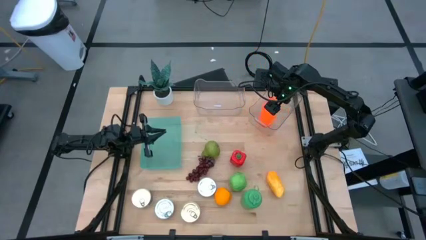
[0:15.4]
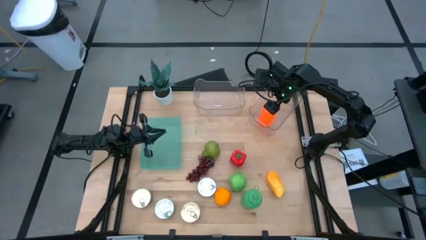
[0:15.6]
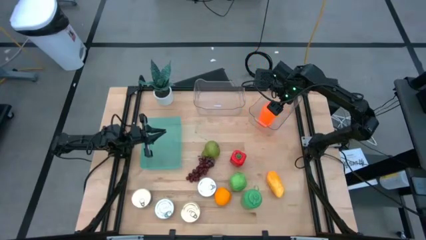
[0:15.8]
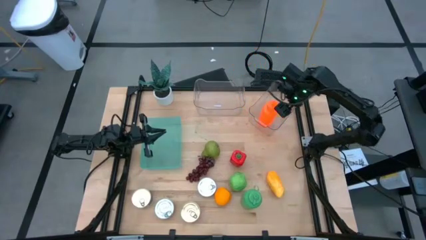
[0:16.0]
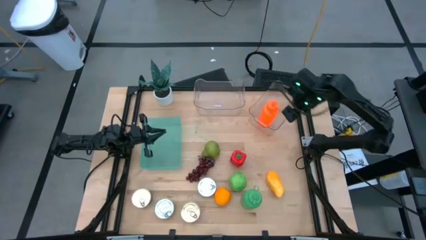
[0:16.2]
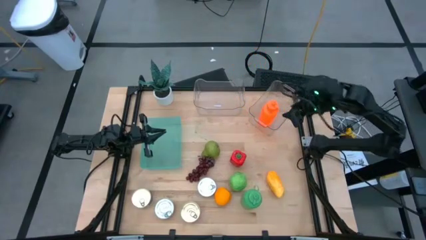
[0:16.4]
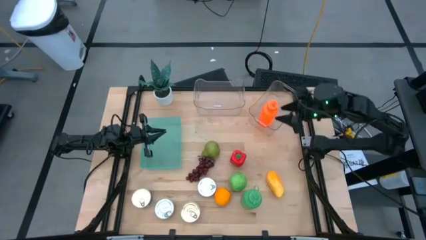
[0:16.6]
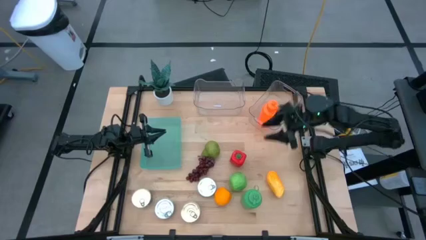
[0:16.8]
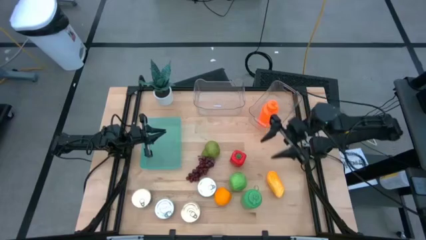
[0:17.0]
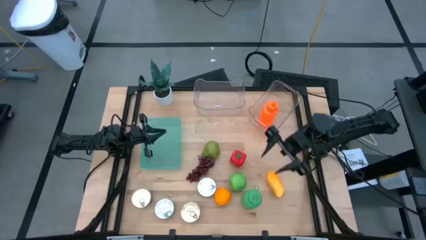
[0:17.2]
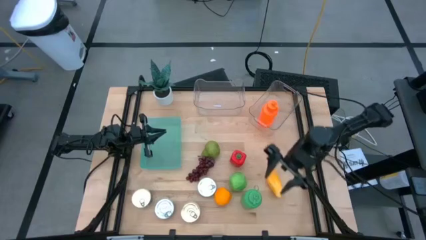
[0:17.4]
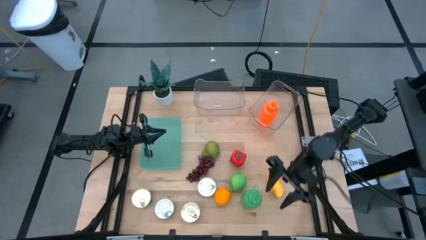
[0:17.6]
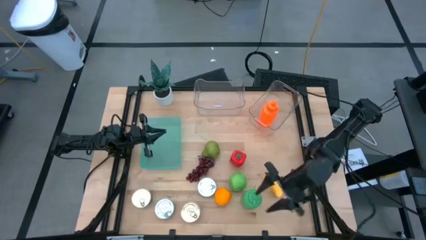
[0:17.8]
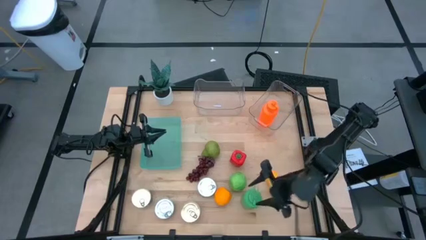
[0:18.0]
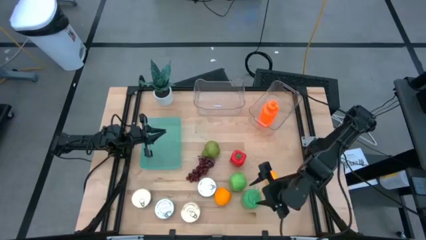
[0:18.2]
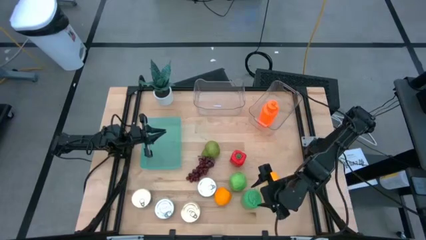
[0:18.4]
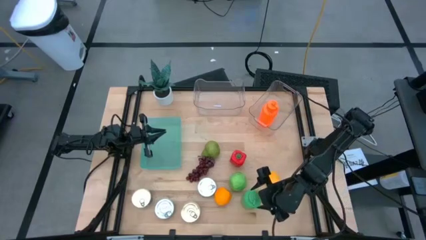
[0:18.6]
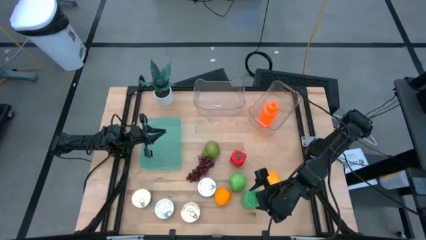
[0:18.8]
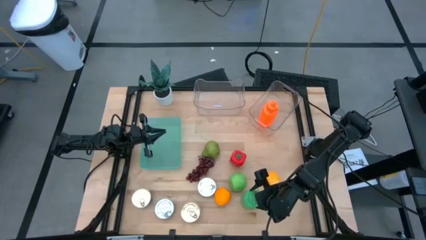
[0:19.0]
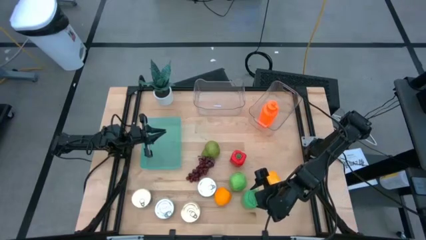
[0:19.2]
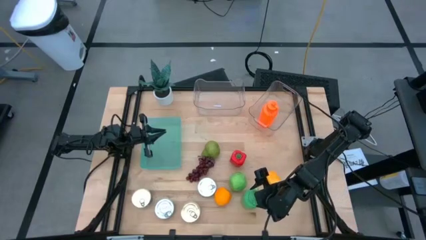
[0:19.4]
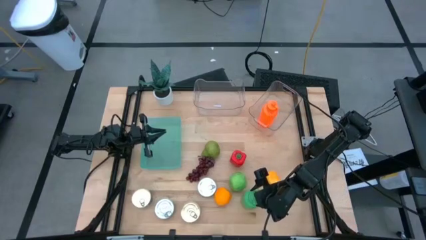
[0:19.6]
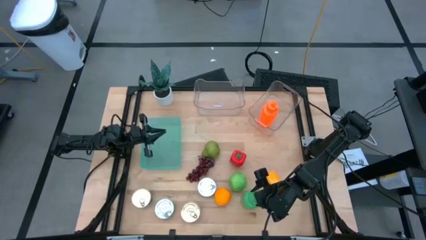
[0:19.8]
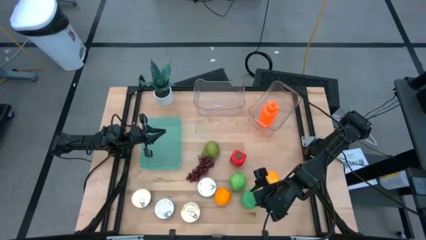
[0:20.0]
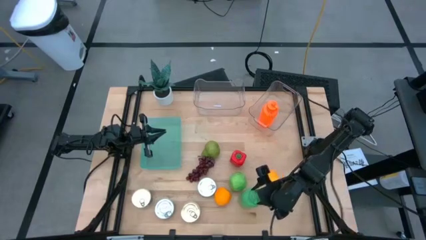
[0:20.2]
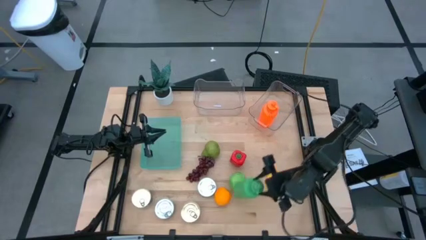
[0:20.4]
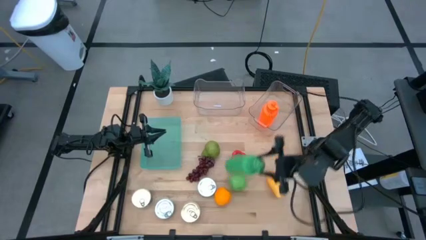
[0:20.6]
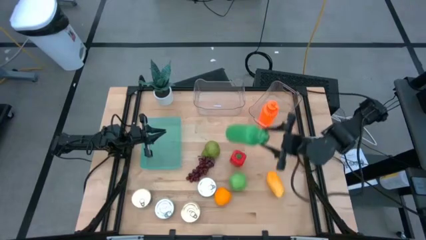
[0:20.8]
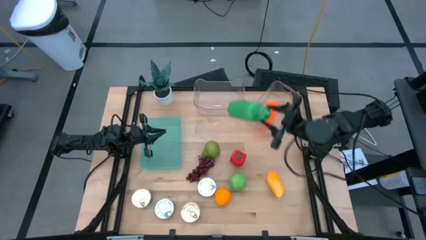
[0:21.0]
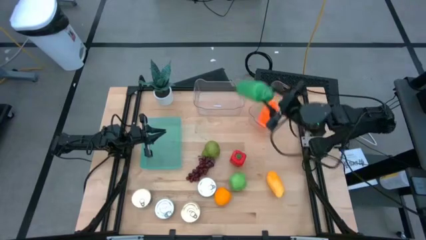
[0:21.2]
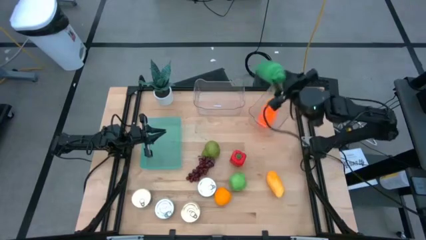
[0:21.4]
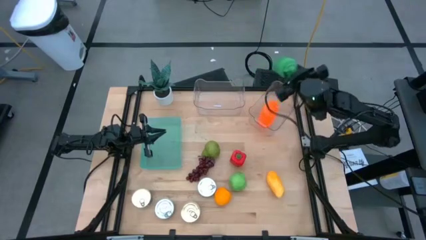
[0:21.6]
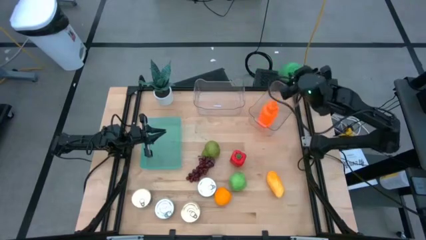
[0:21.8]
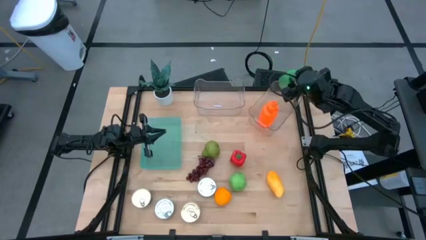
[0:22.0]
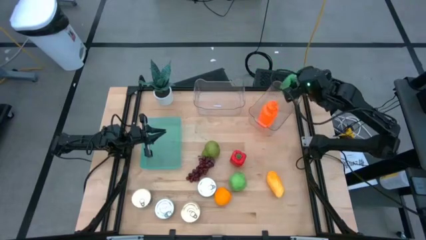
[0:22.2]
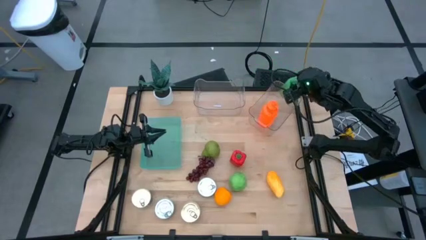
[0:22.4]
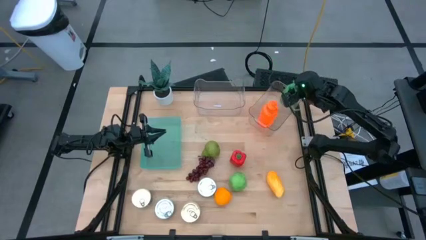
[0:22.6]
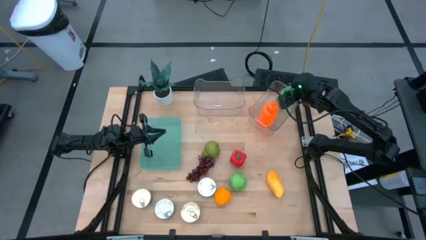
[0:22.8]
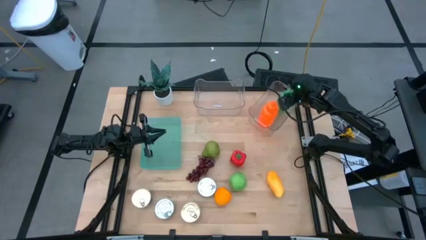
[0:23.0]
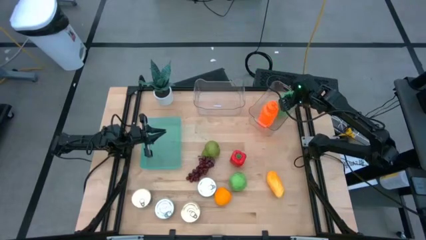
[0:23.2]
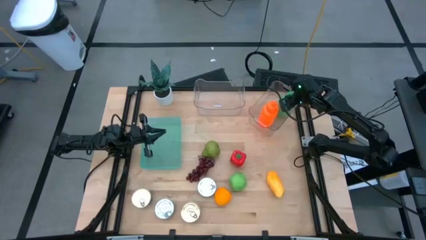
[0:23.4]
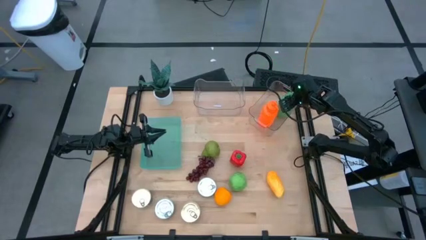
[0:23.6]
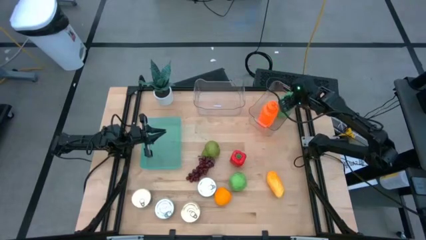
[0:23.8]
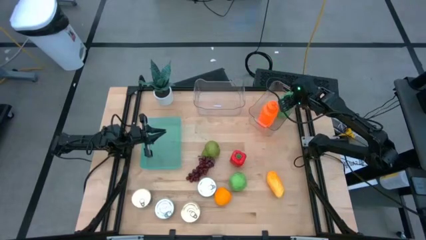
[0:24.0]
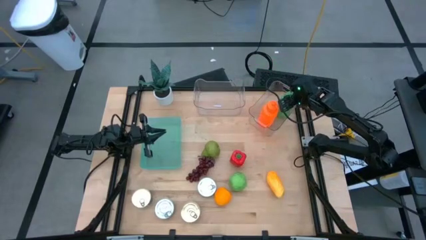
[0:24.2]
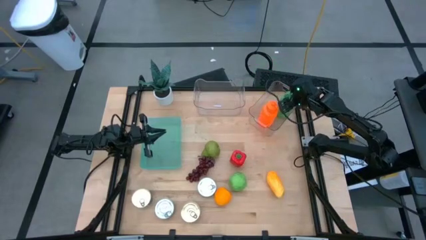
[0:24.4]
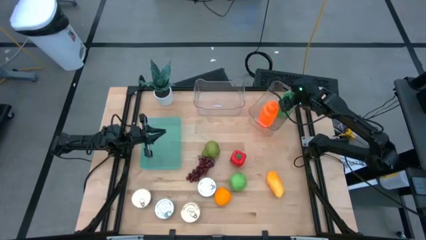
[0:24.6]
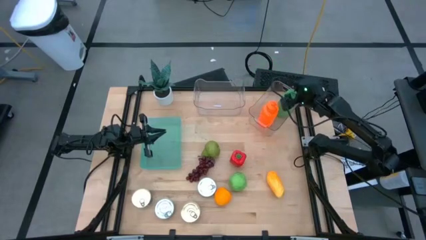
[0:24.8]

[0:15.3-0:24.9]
Task: Pick & Place Food Item
Put the green tumbler into the right transparent bin

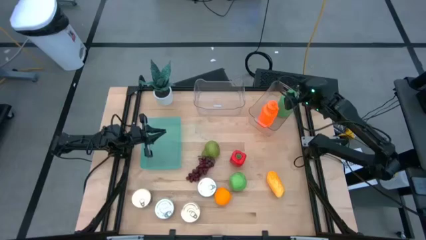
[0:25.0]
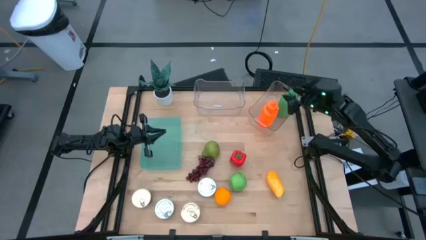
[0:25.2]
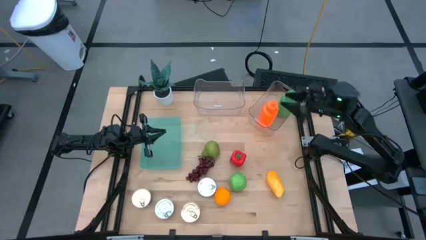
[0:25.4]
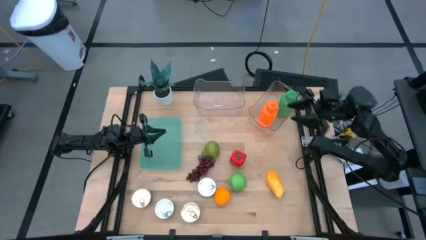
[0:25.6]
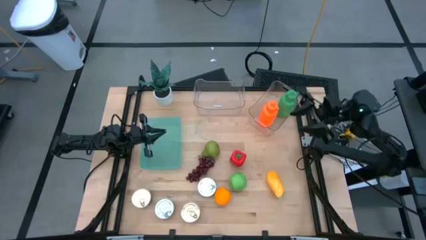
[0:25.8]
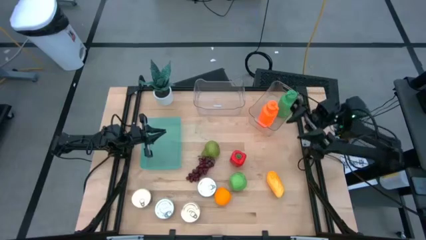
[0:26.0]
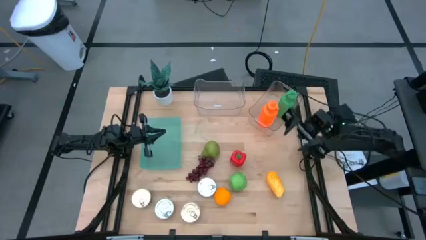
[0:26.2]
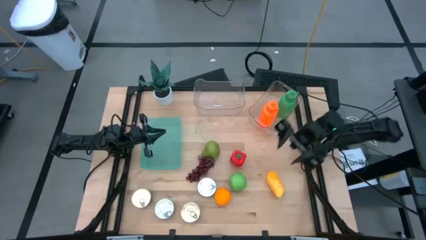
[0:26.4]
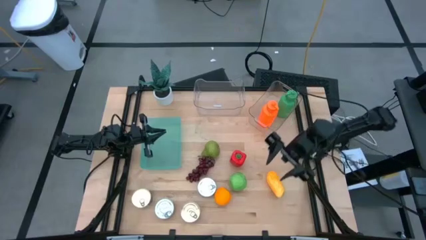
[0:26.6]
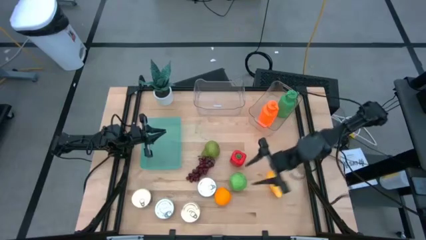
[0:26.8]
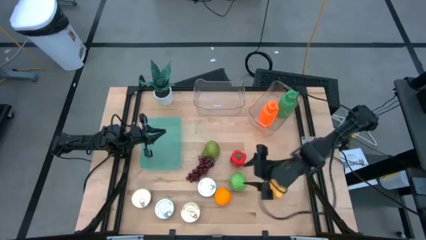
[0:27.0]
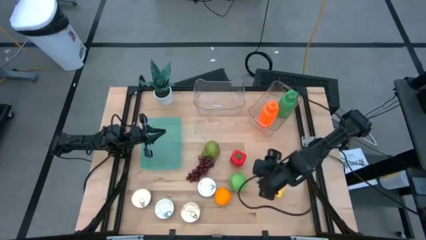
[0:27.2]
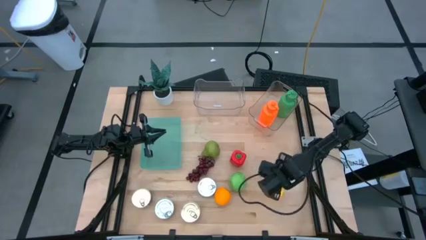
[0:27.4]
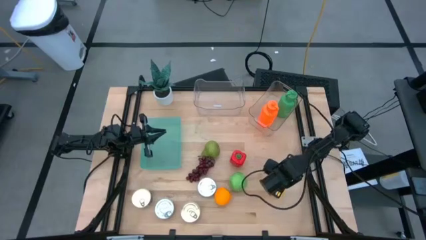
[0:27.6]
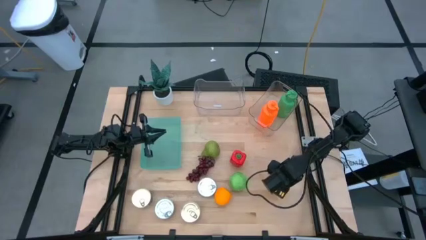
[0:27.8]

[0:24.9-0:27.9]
Put the yellow mango into the left transparent bin

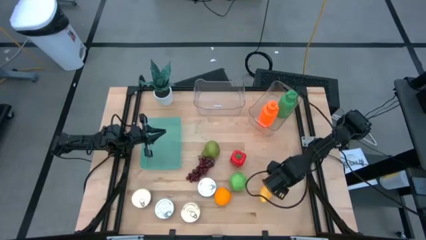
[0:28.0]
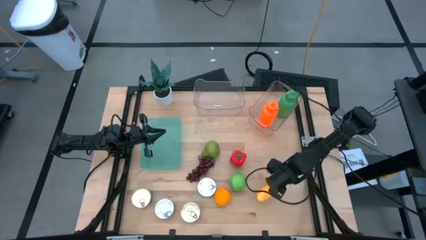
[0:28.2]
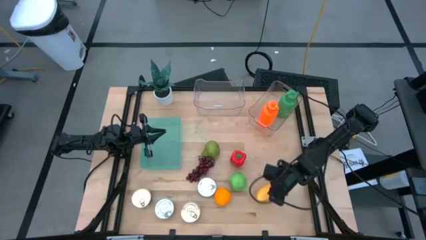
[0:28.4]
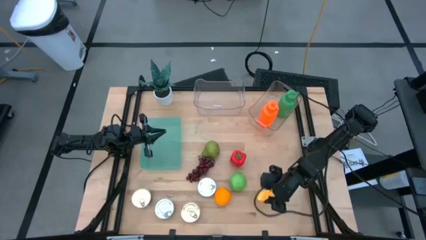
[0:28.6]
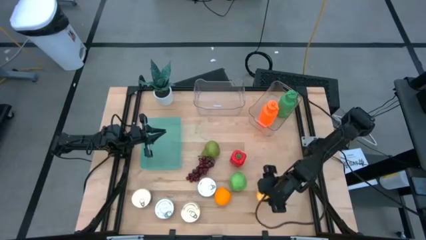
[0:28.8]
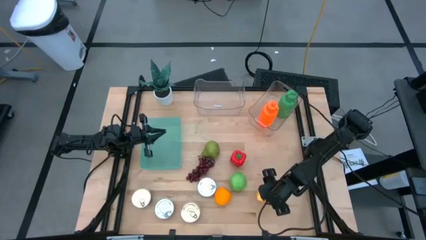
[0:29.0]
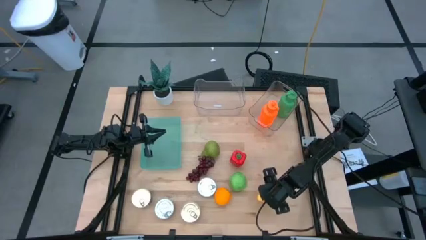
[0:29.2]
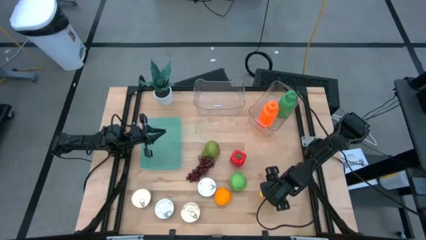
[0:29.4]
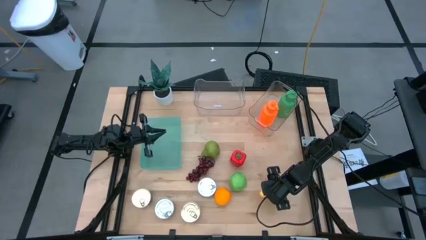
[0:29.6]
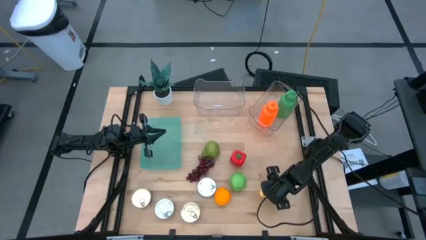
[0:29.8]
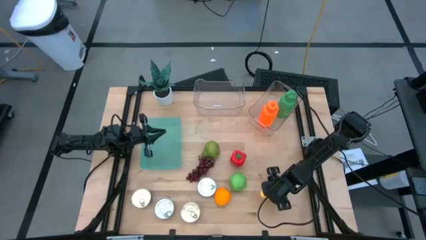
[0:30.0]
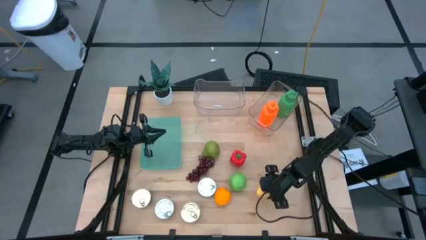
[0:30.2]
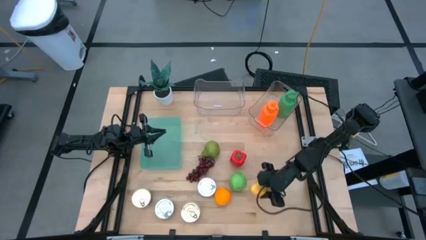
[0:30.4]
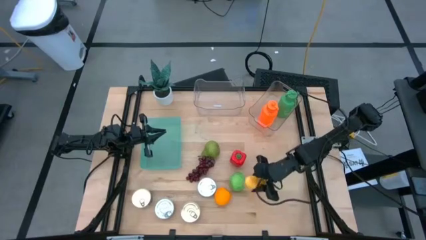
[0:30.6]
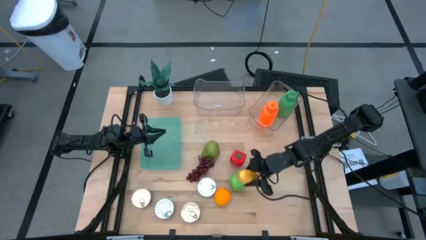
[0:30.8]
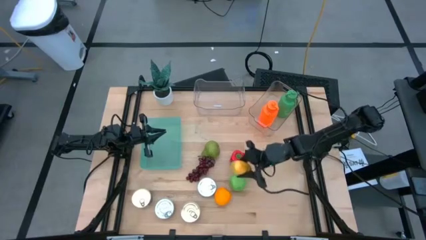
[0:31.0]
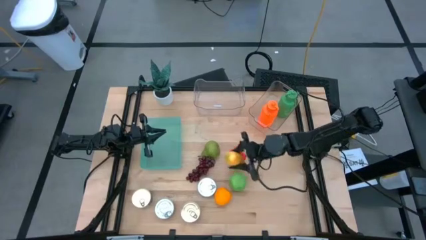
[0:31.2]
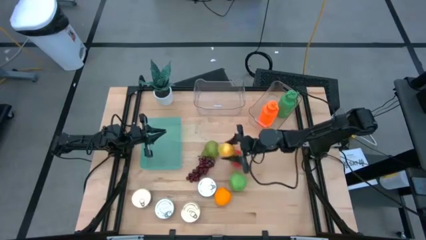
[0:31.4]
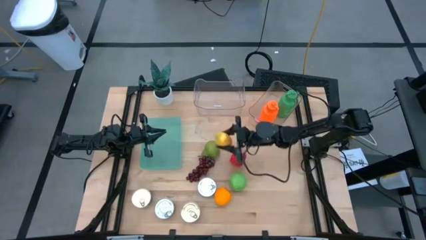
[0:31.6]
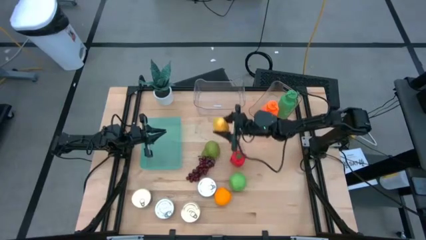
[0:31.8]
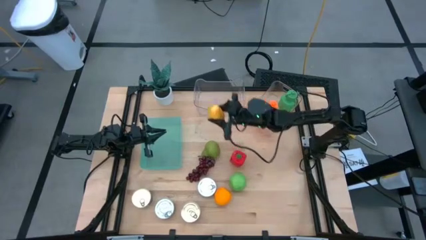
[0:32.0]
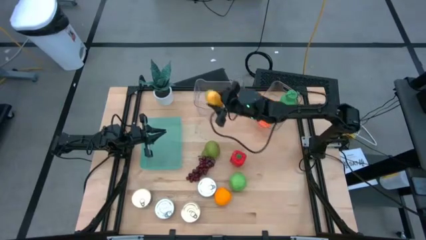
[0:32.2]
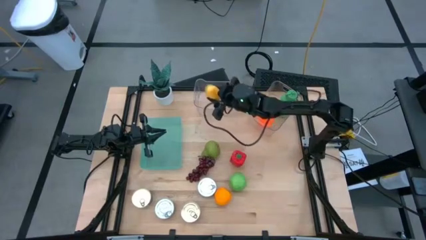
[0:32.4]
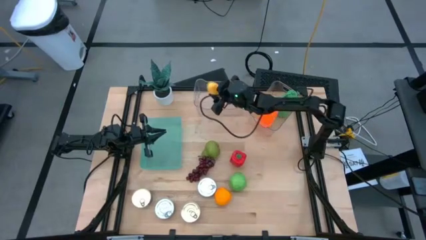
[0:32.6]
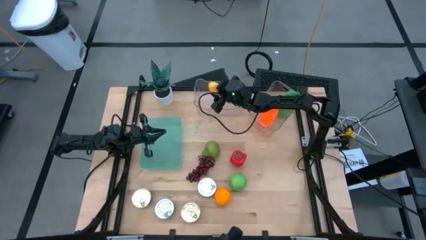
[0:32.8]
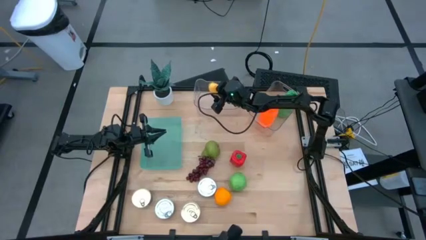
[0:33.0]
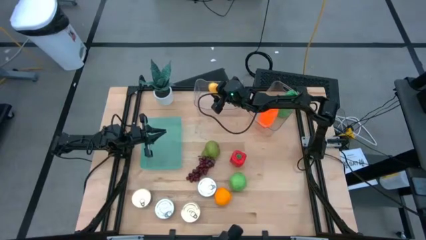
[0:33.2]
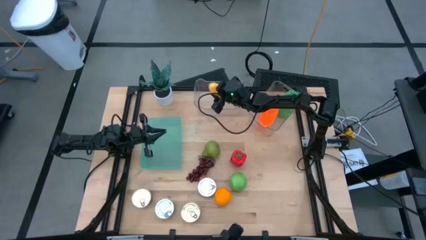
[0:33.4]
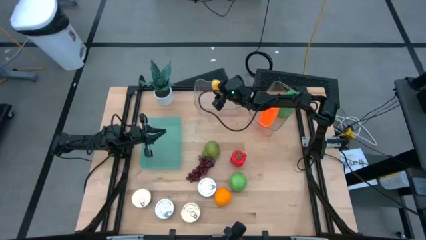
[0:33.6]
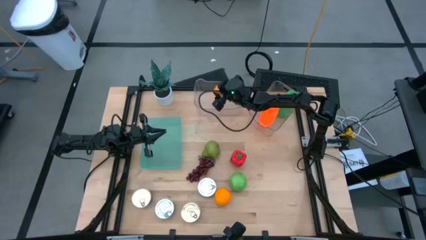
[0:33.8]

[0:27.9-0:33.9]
Put the yellow mango into the left transparent bin
